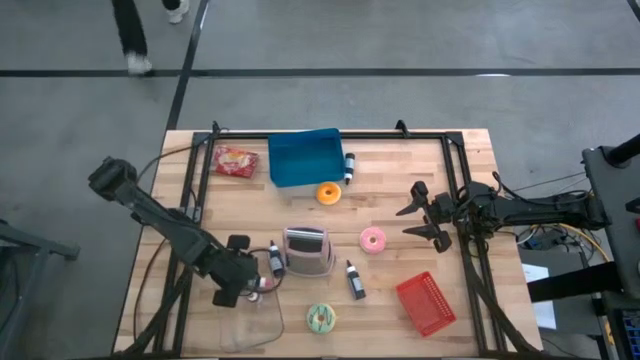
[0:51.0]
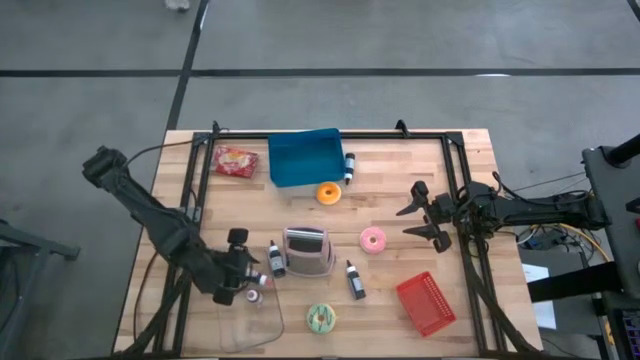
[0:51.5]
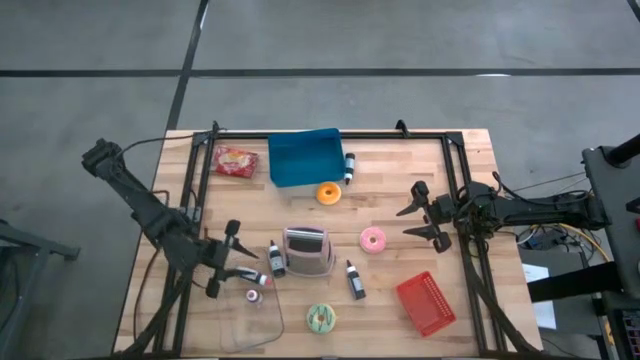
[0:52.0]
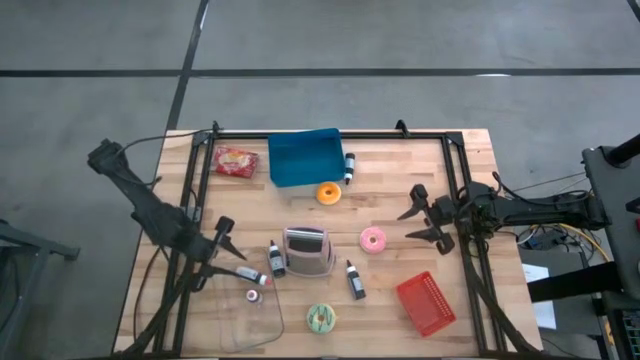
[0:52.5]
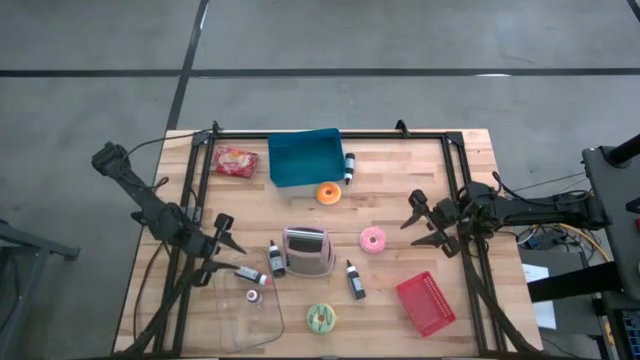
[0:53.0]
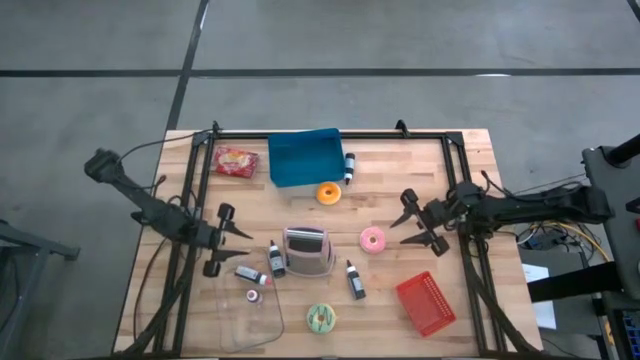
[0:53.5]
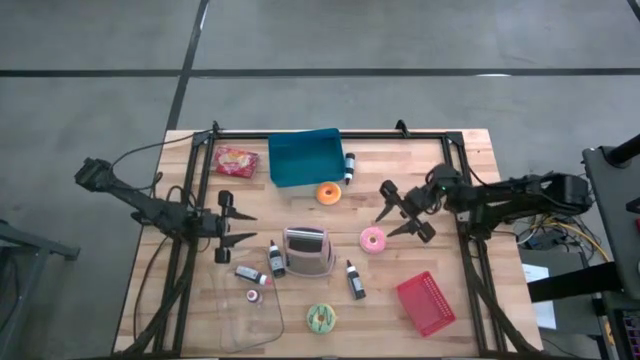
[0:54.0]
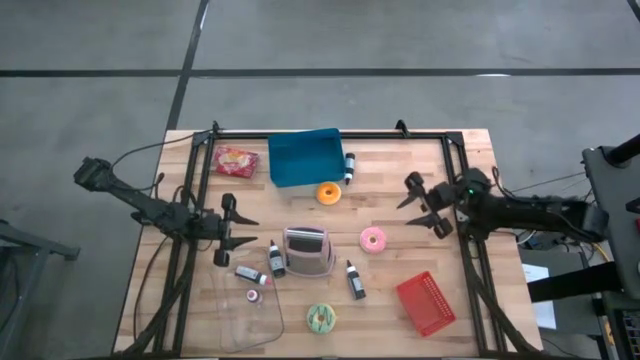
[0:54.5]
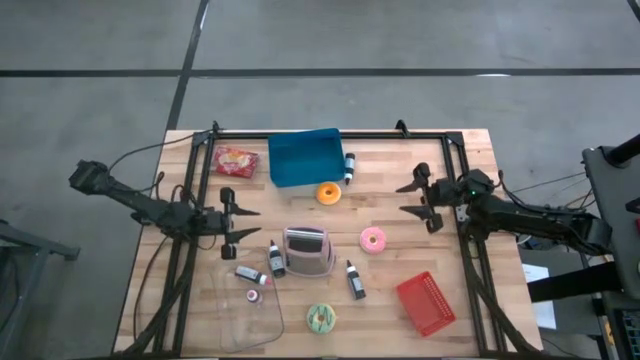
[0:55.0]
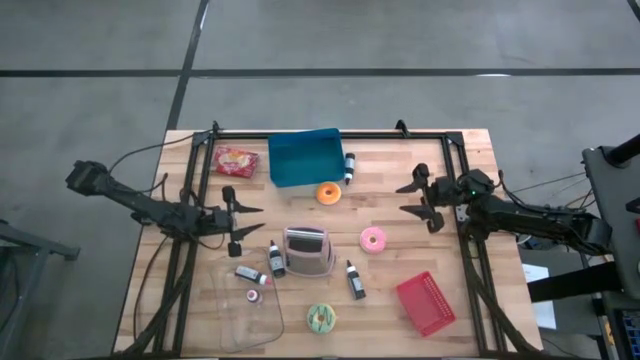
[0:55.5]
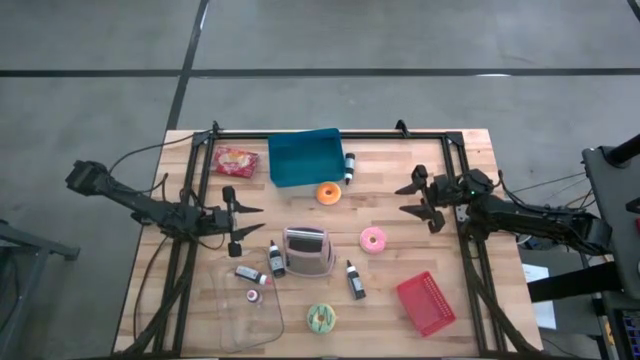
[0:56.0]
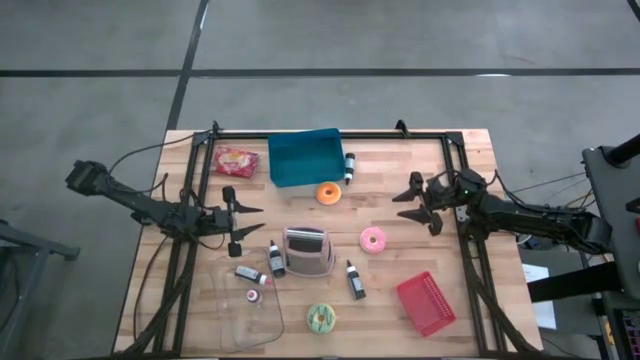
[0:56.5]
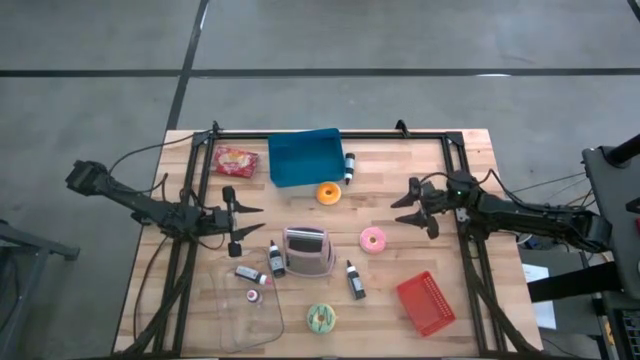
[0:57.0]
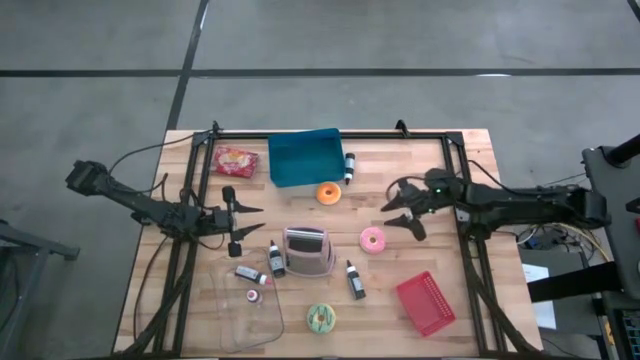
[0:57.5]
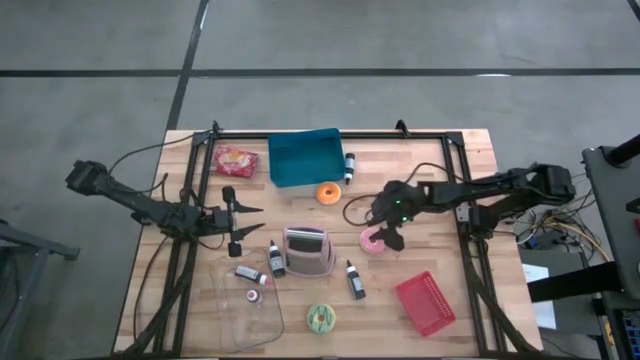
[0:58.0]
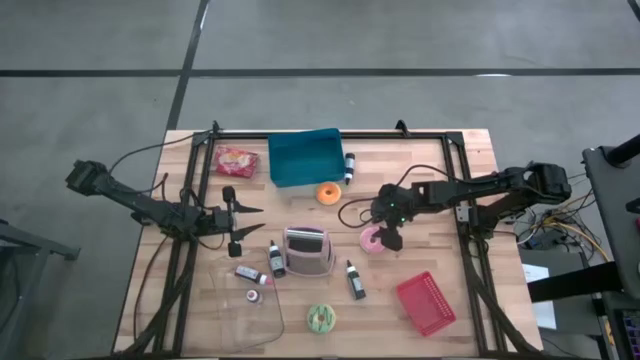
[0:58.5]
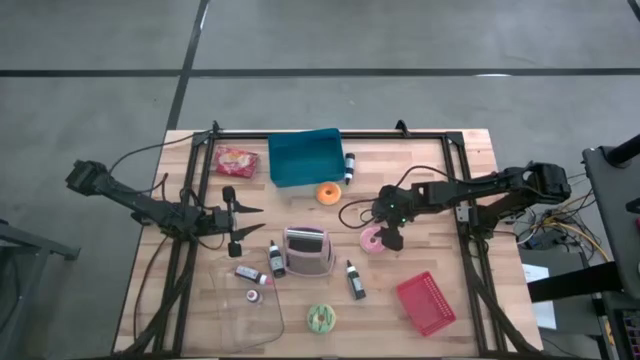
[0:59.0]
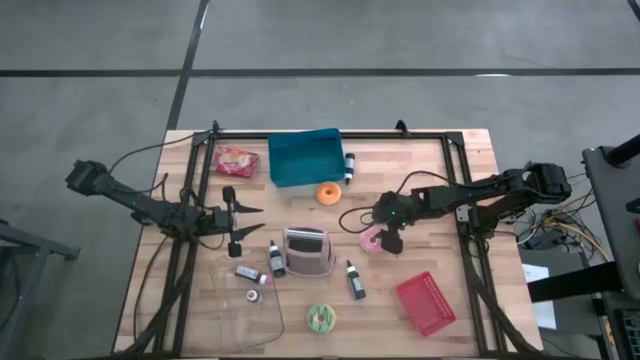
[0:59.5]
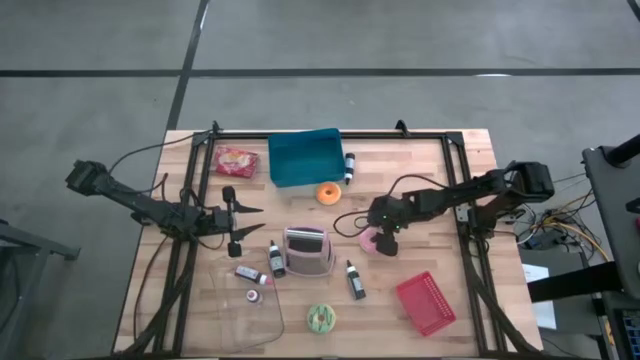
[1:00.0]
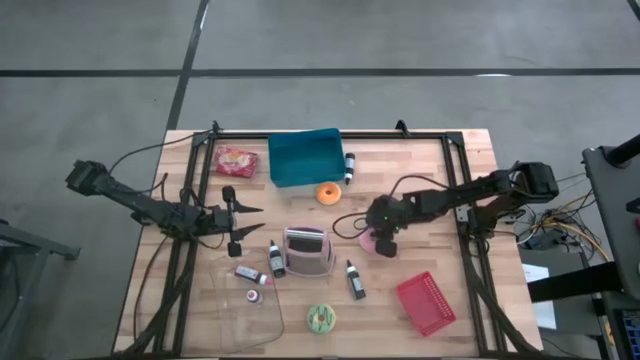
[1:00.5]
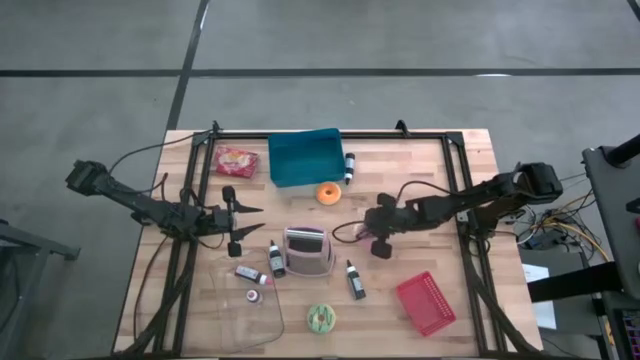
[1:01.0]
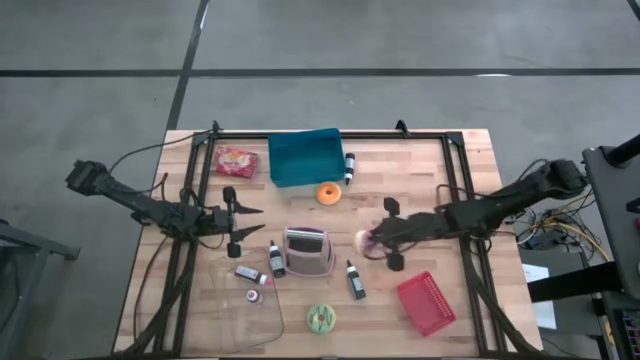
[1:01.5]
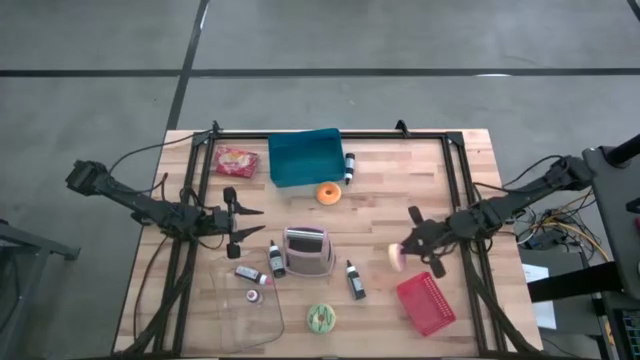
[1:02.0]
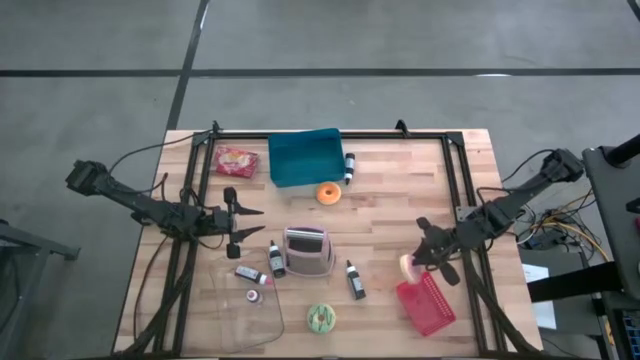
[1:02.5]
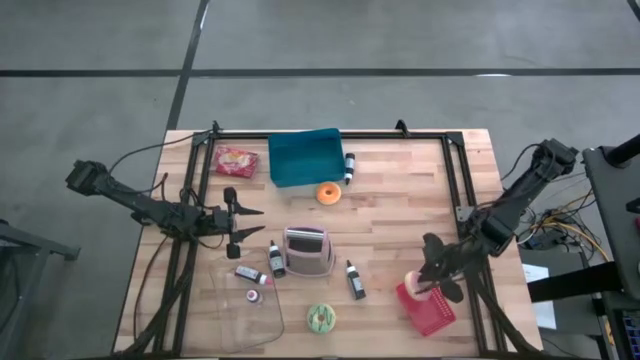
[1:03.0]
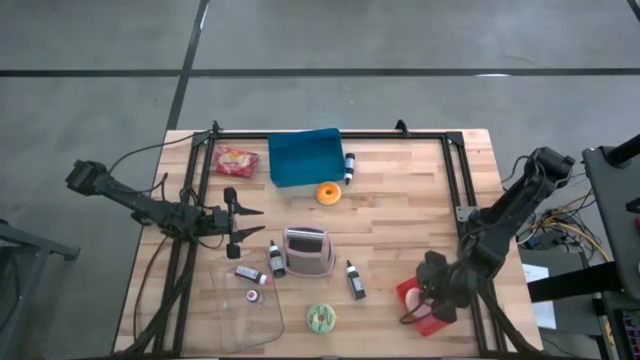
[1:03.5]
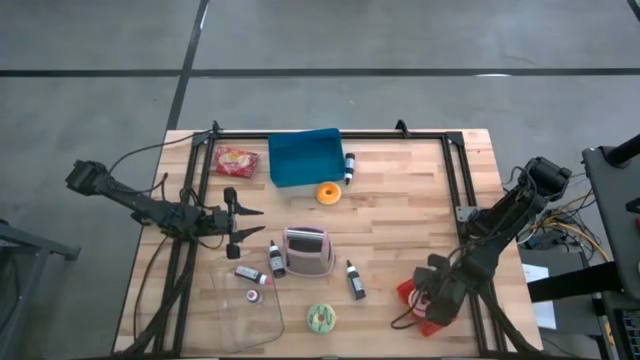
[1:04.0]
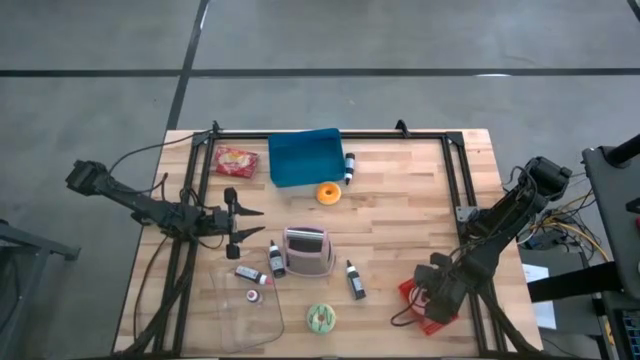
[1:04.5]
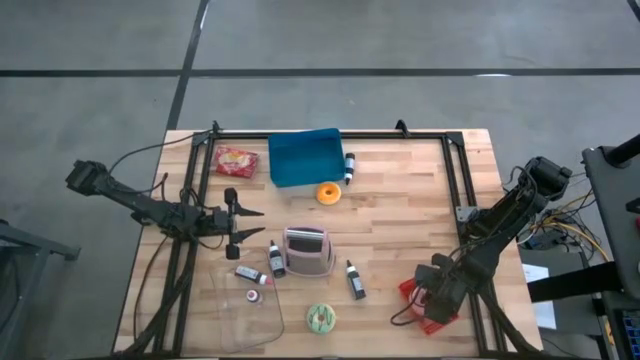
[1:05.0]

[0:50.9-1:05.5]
Task: Pick & Place Food Item
Put the pink donut into the red bin

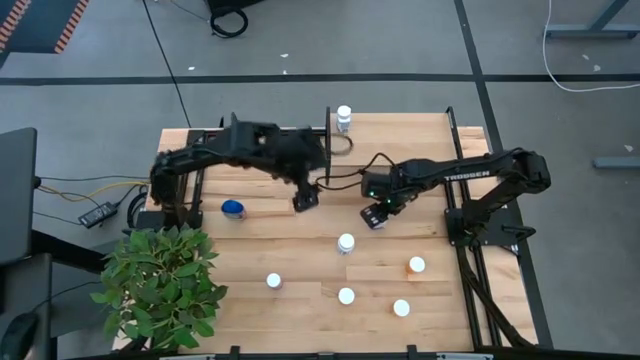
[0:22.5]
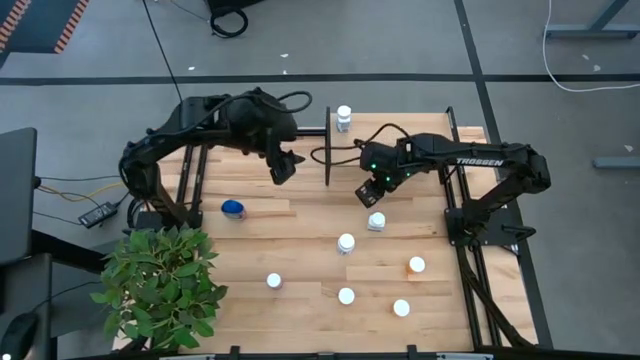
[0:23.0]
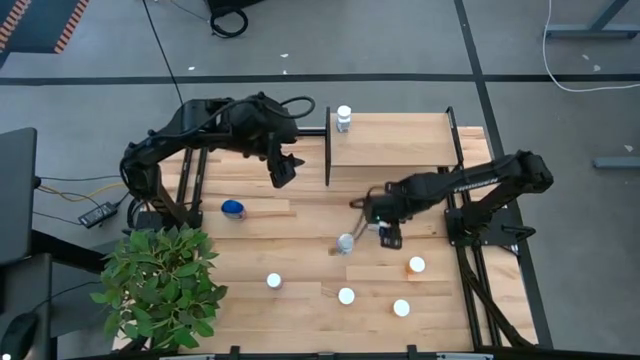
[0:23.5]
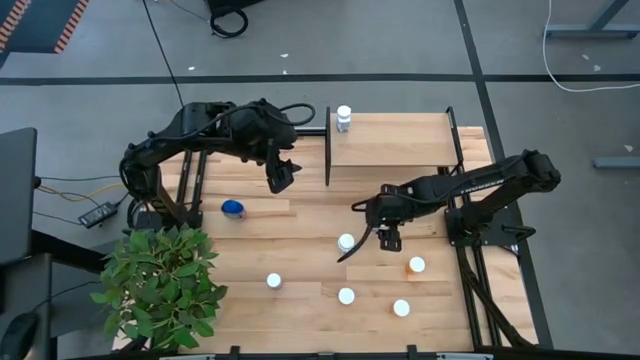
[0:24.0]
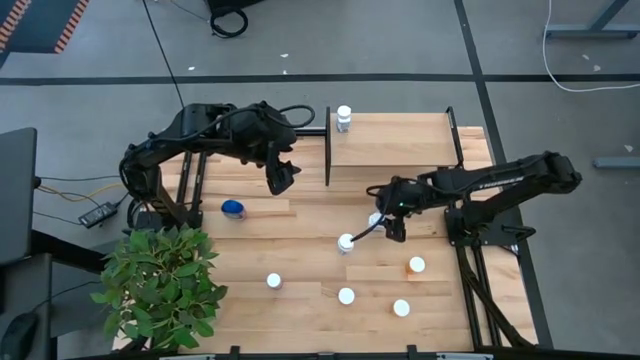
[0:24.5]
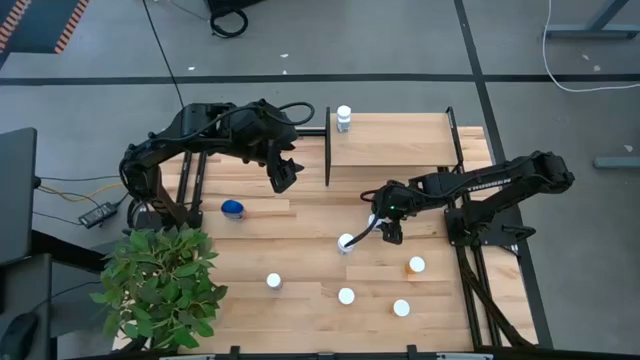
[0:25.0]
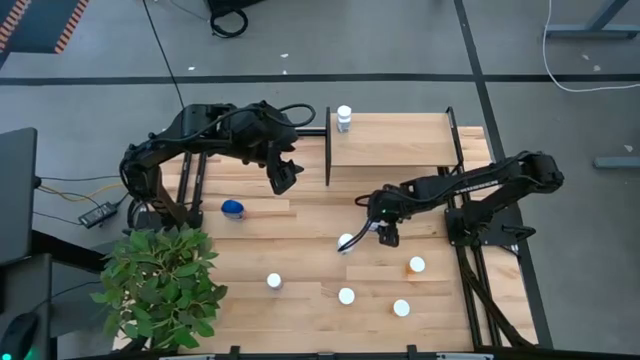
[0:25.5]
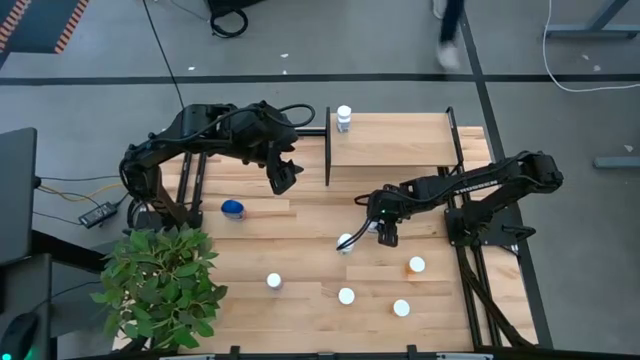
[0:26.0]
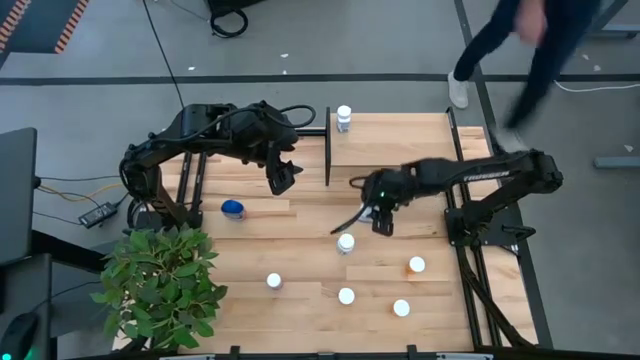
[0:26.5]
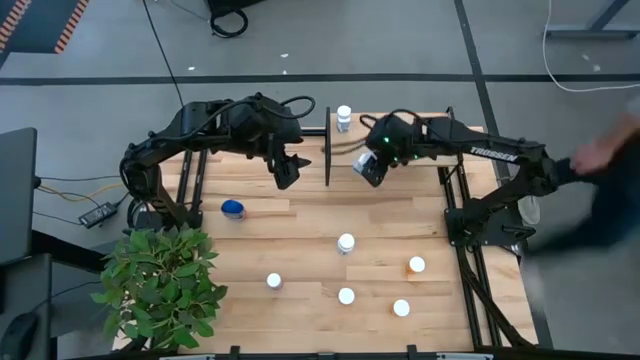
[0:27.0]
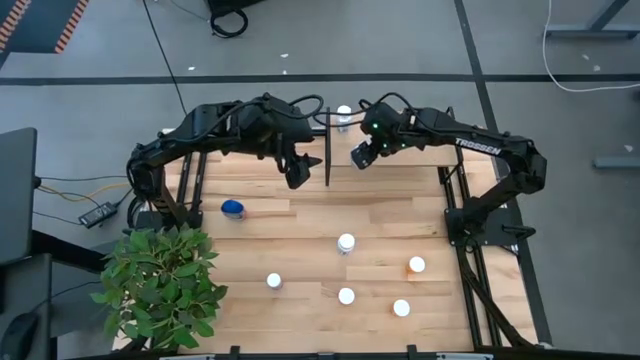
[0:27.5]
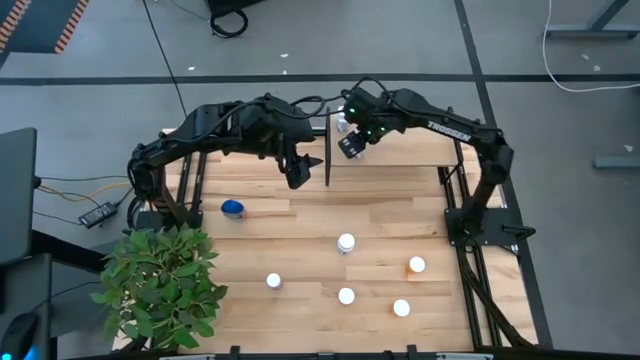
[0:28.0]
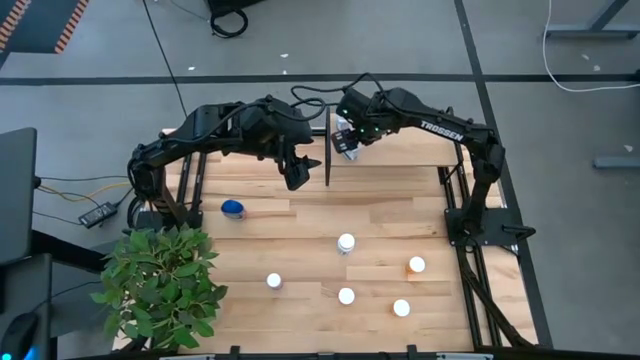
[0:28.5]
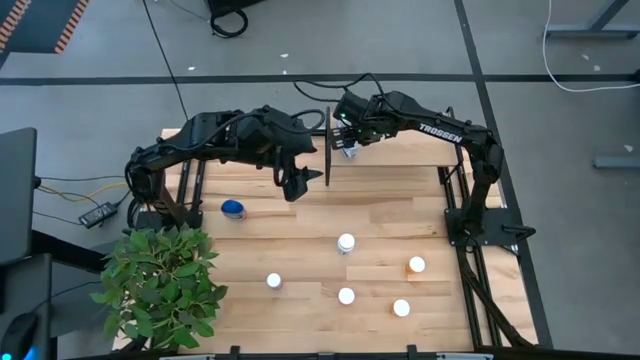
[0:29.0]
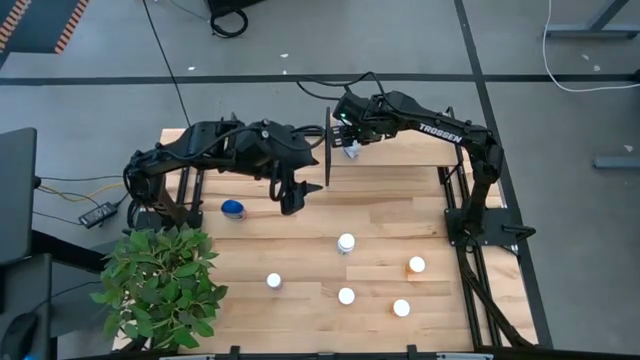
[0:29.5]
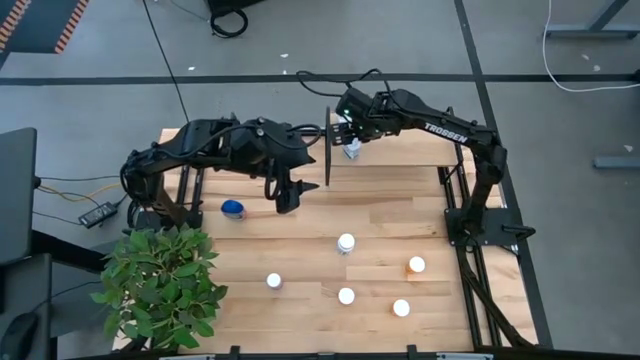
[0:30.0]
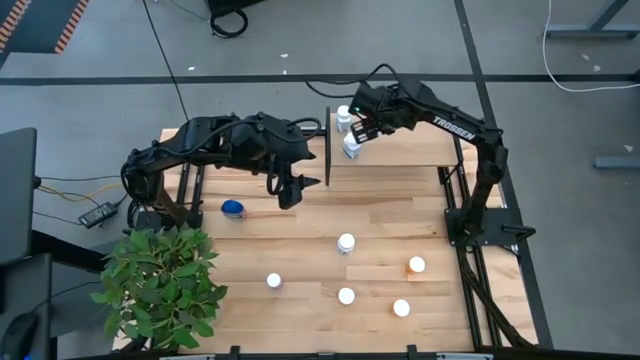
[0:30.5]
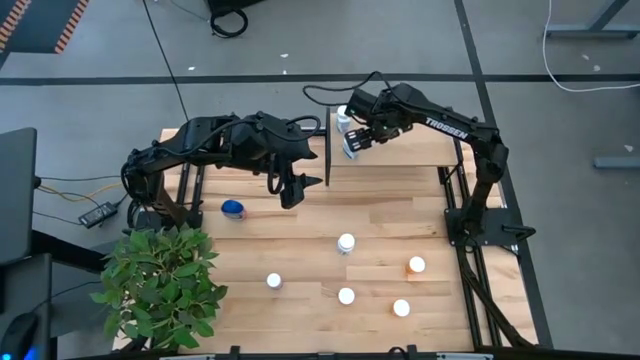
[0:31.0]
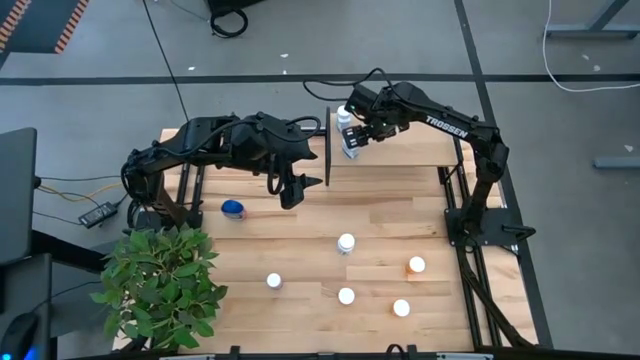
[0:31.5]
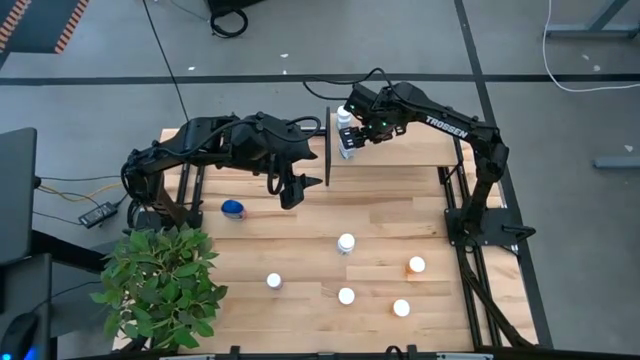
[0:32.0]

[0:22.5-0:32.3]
Task: Pick and place medicine bottles onto shelf by color
Put the white blue medicine bottle on the shelf
